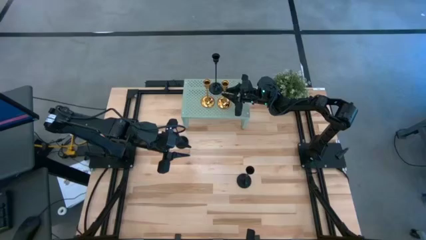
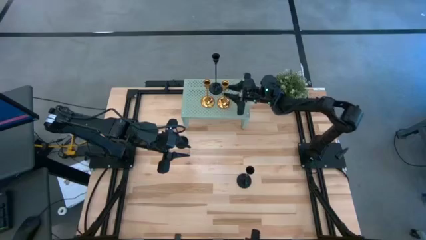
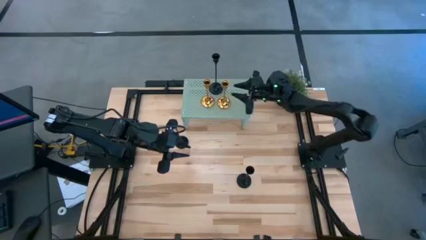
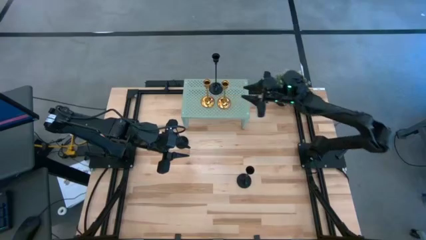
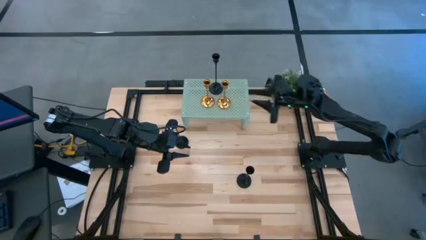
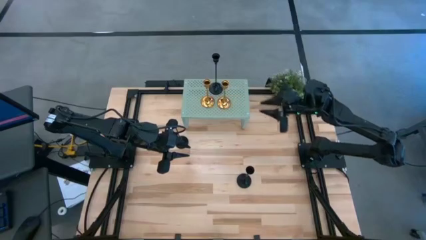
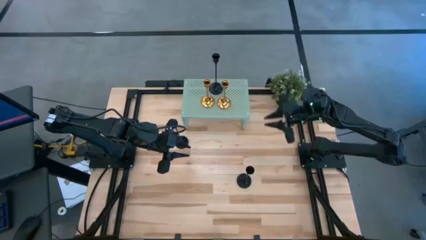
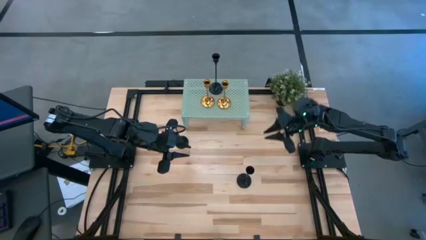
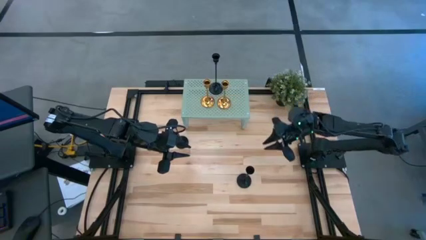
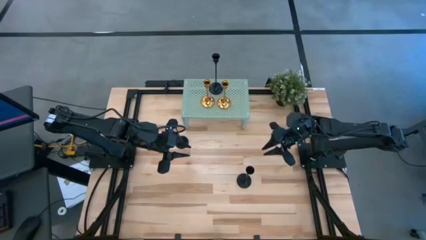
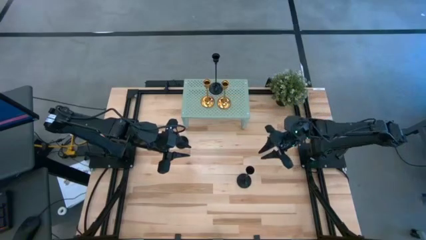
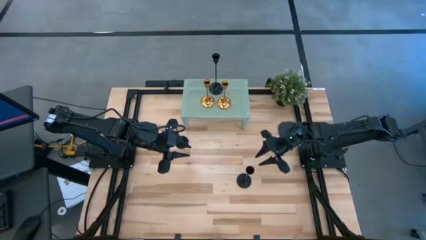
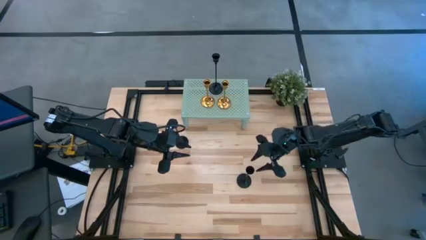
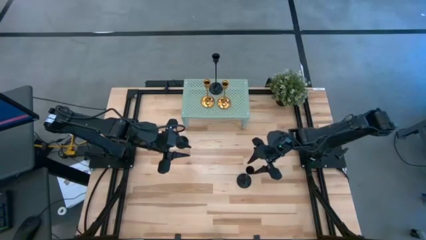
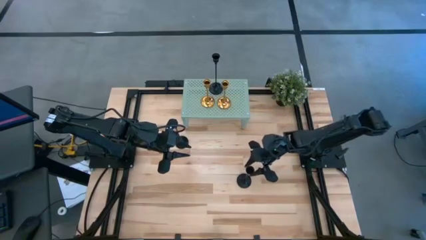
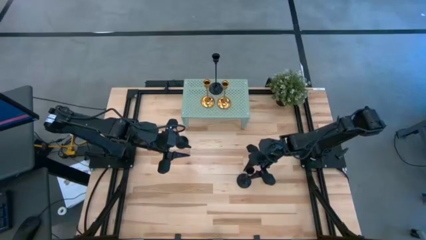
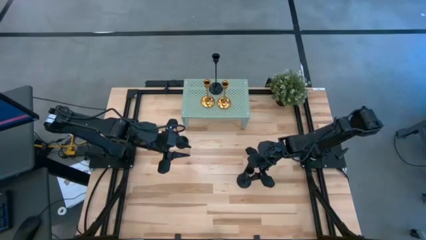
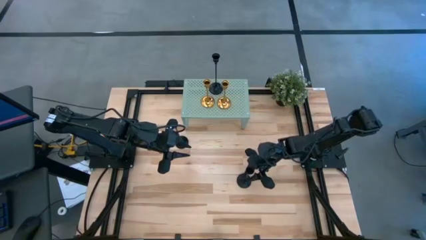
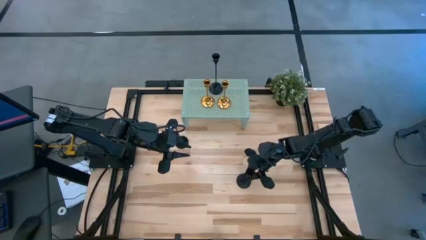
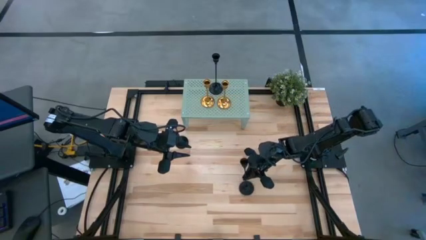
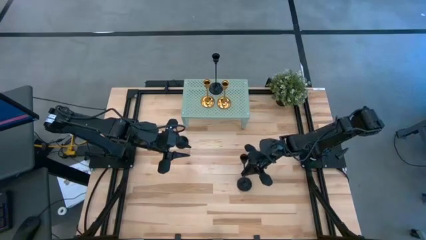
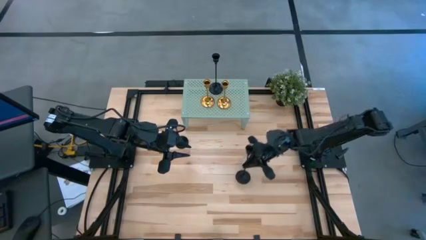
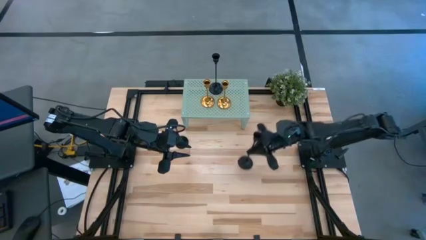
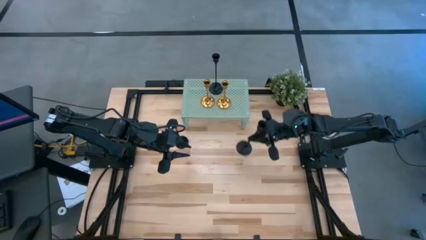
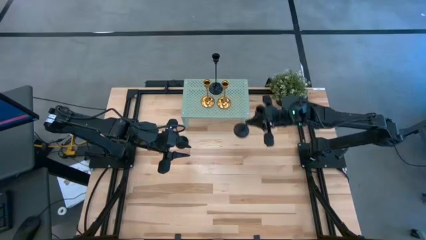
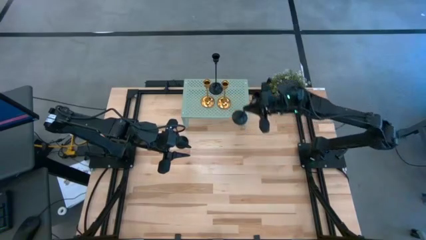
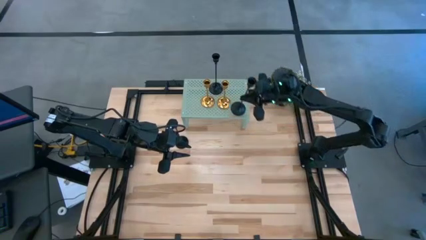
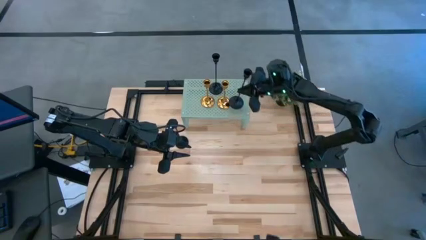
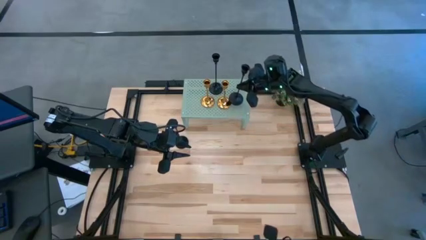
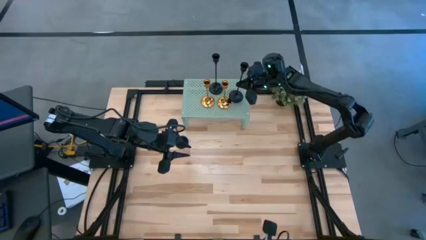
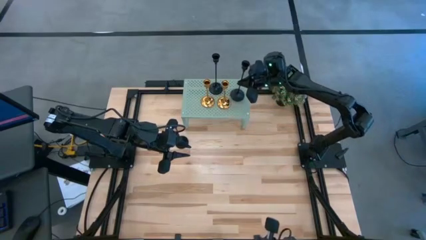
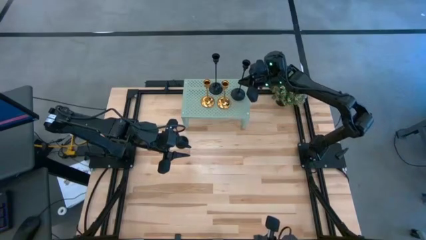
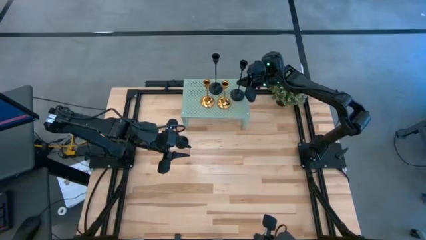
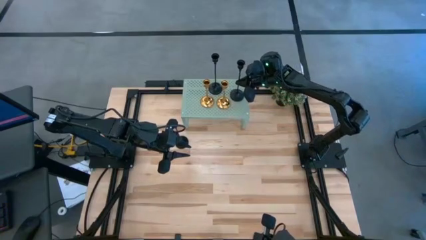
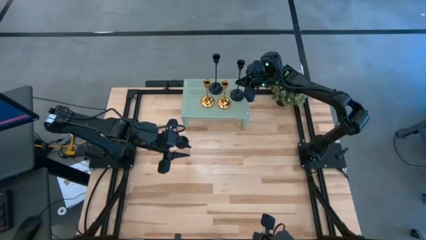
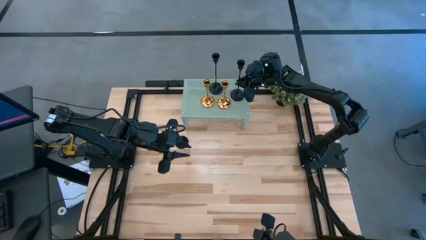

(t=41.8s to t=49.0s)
Task: Pick & Place candle stick holders
Put the bottom black candle holder on the shelf

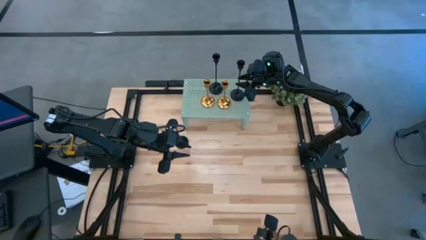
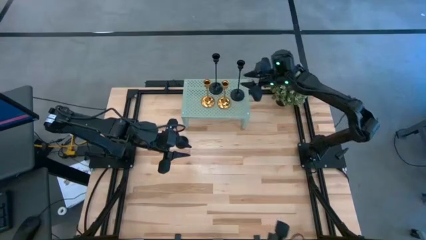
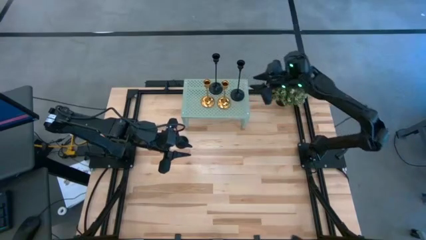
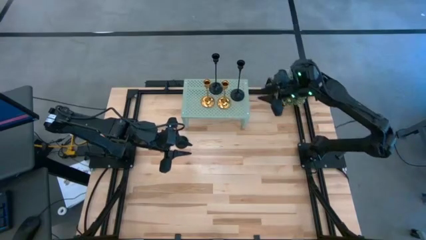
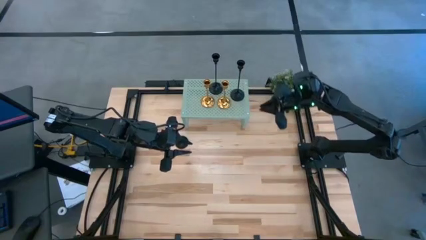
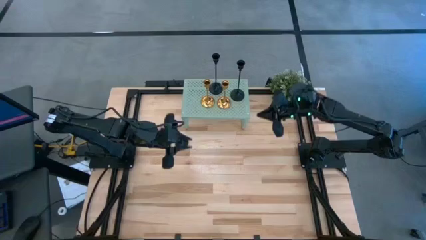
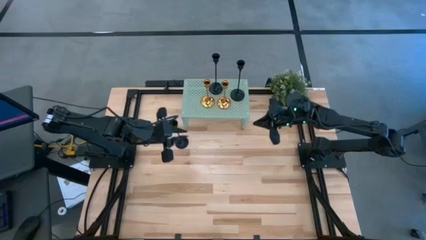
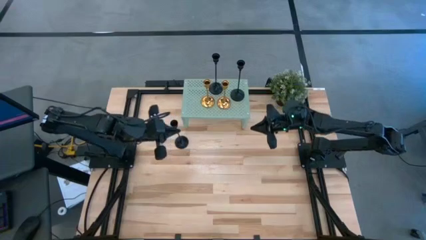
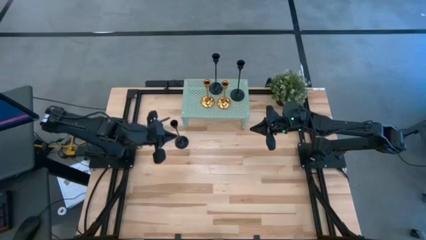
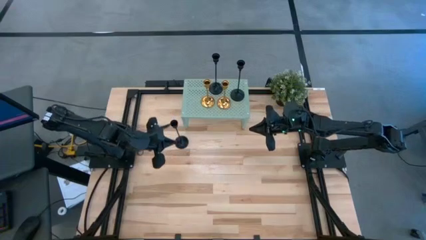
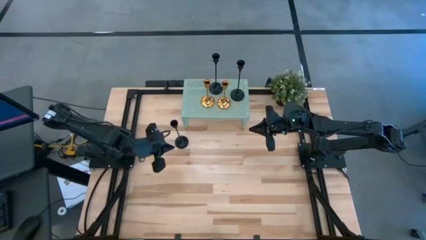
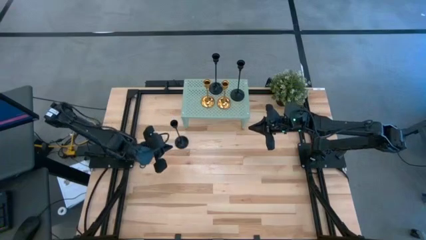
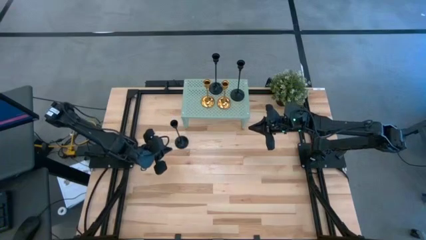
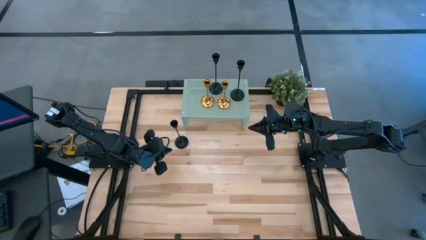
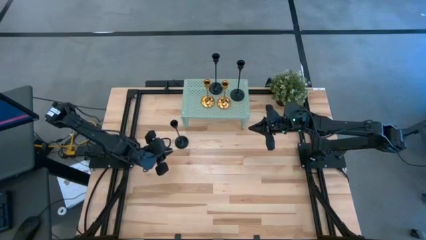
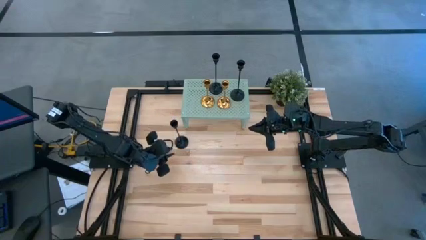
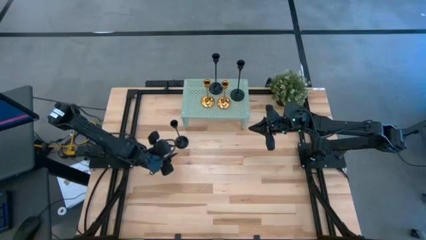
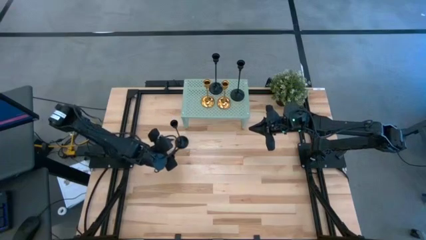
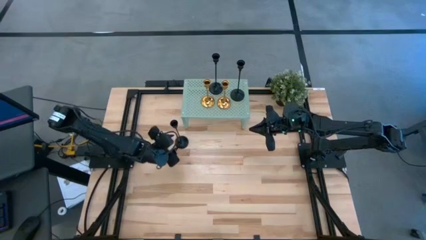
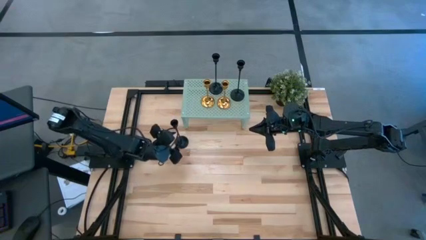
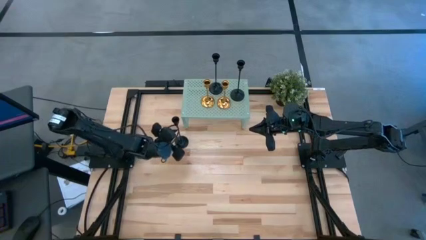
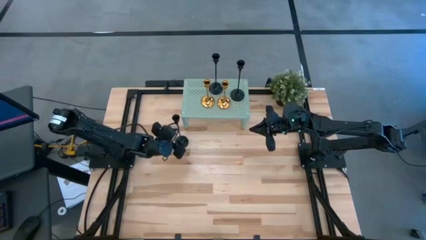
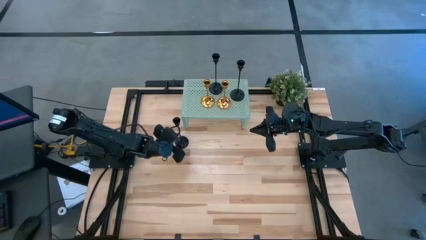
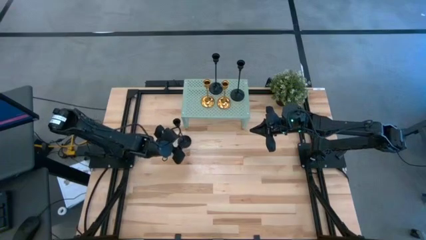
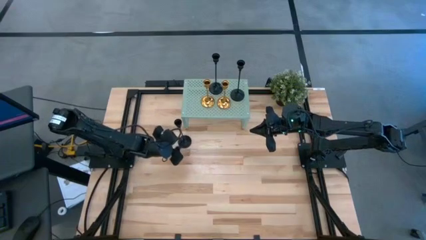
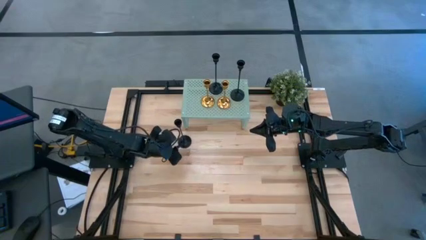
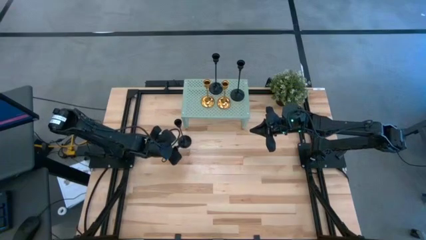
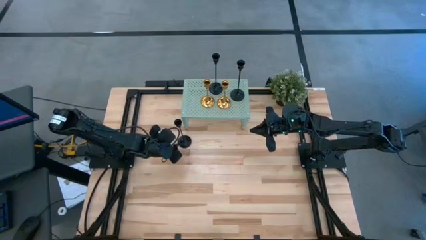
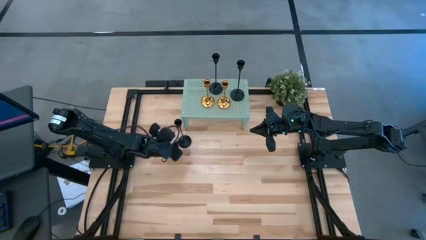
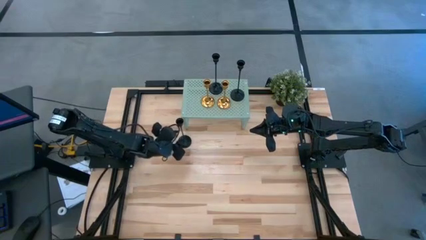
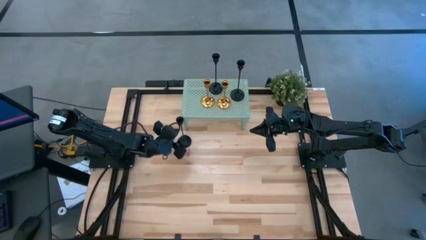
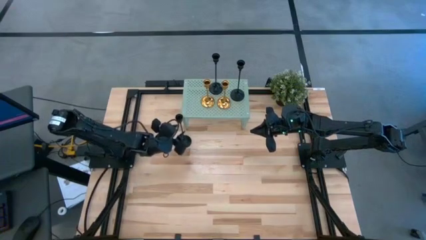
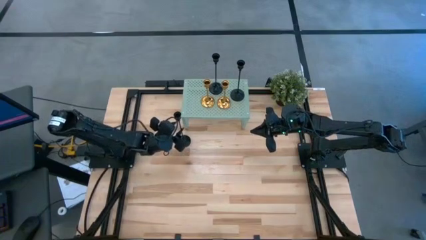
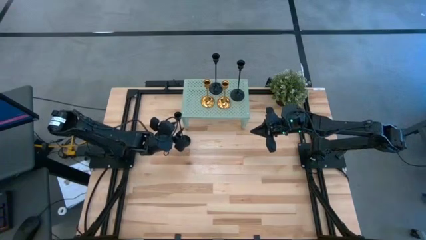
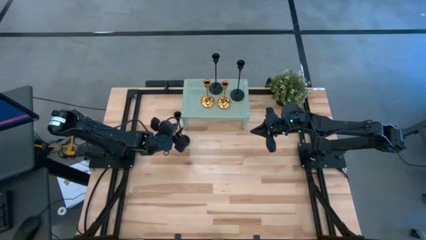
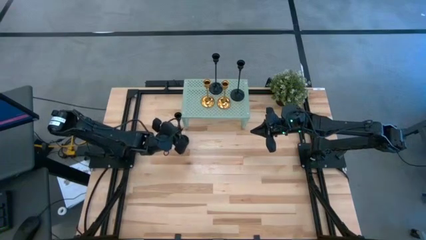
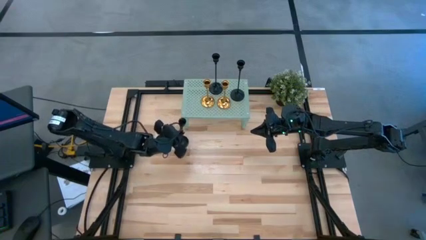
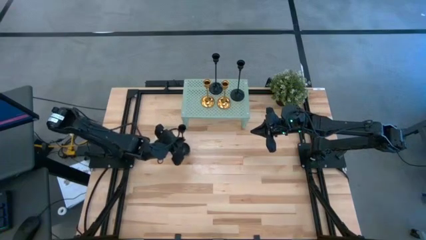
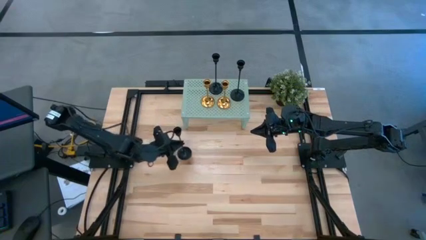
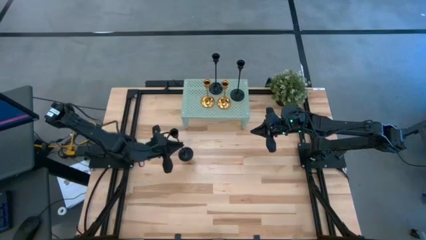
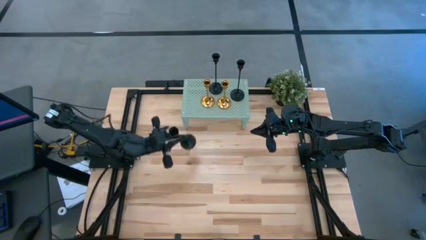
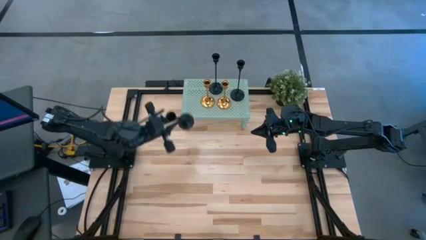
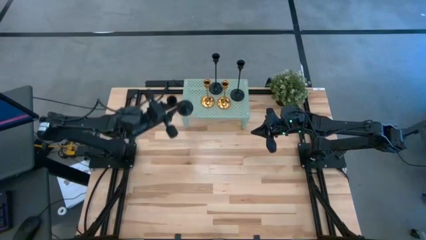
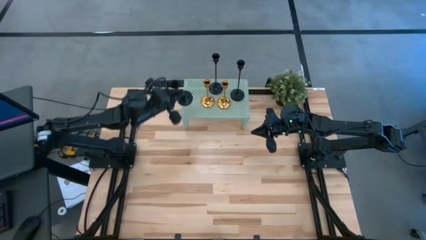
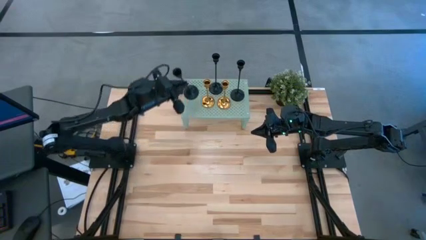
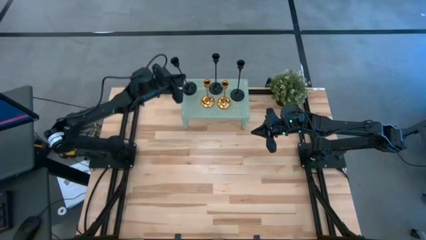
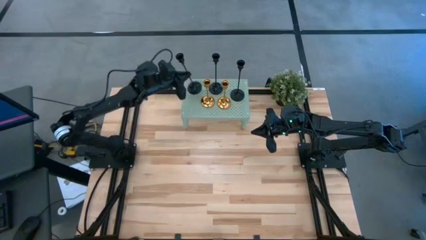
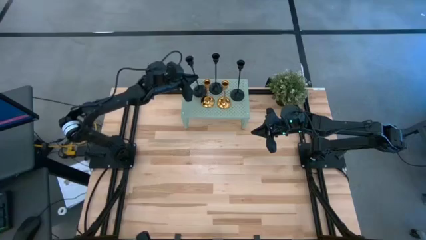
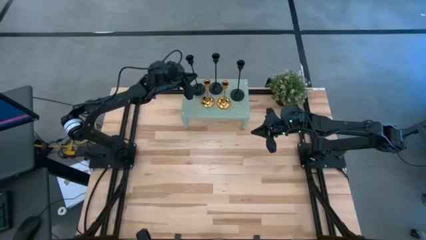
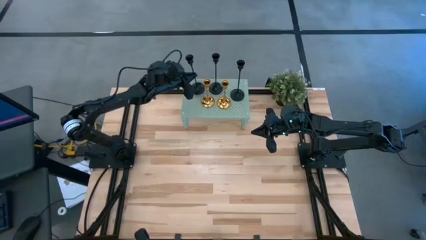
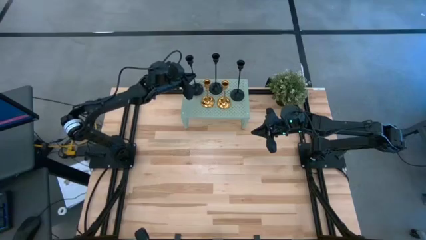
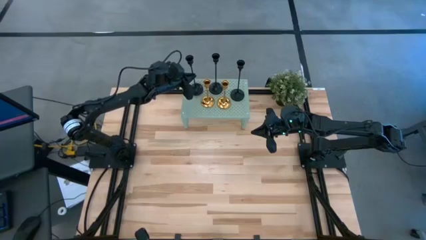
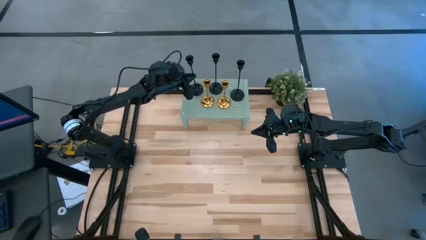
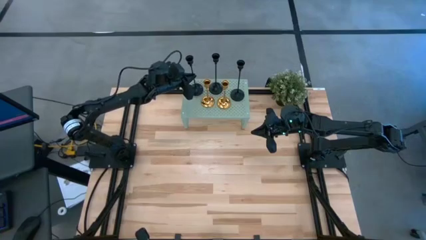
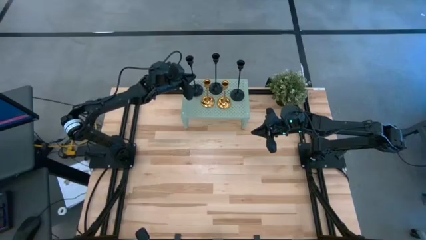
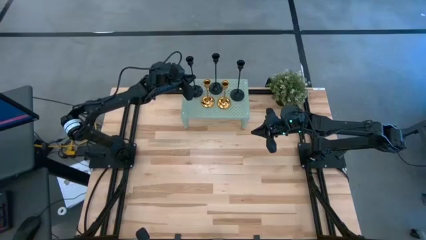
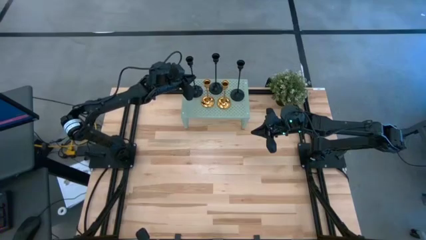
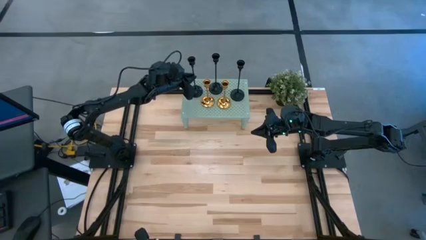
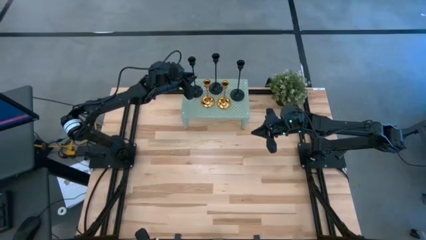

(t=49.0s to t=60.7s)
Put the black candle holder on the shelf
